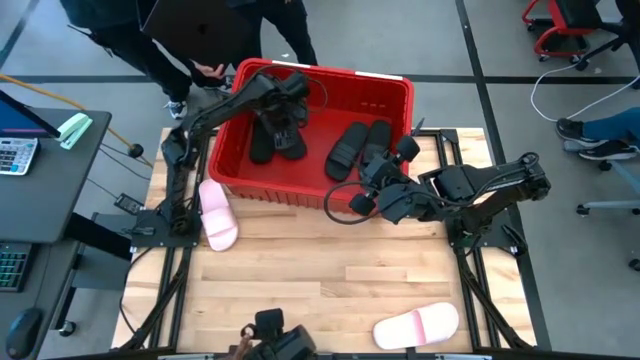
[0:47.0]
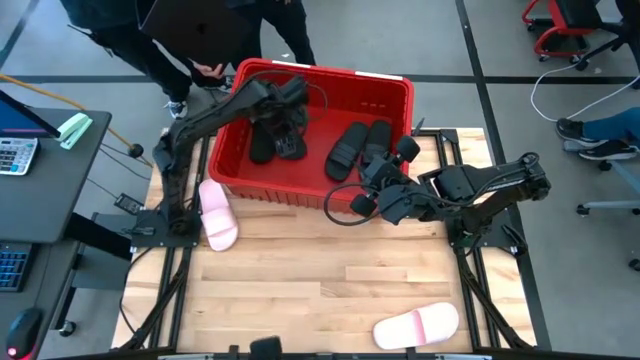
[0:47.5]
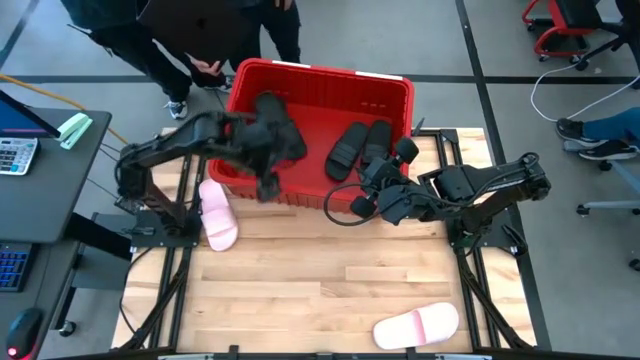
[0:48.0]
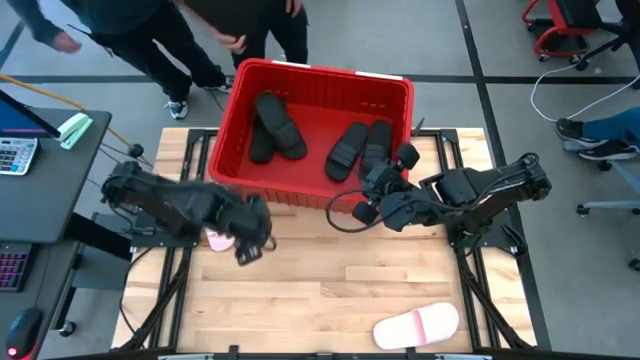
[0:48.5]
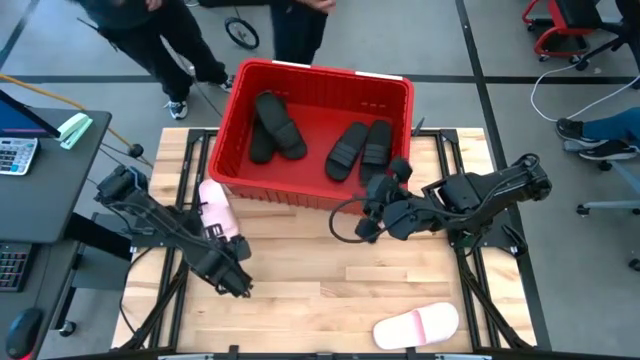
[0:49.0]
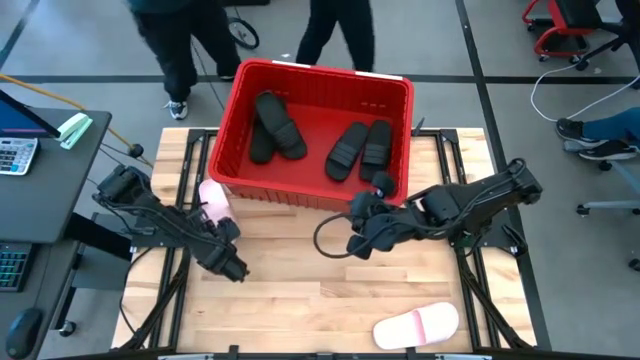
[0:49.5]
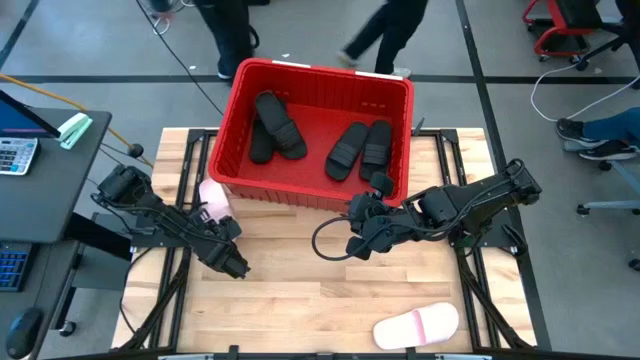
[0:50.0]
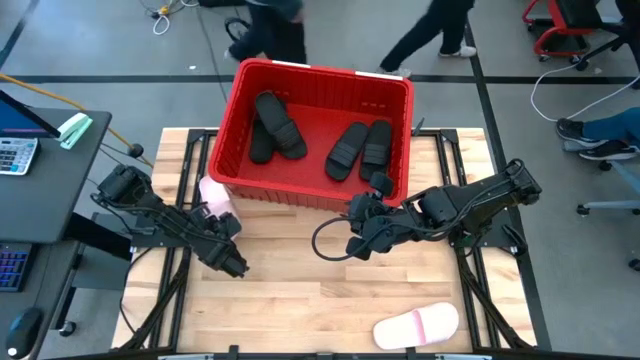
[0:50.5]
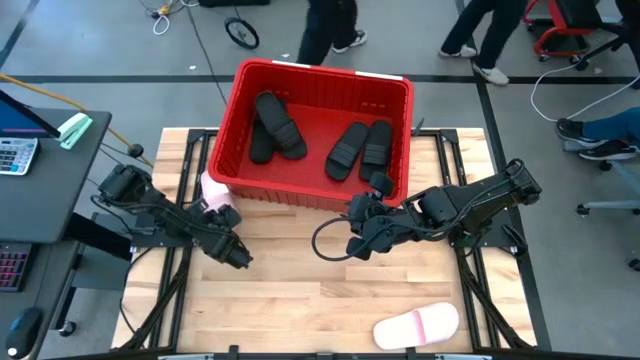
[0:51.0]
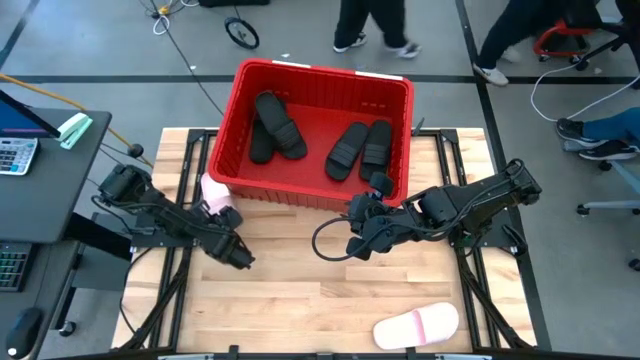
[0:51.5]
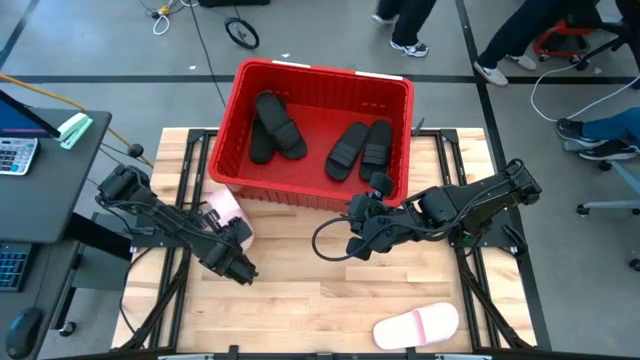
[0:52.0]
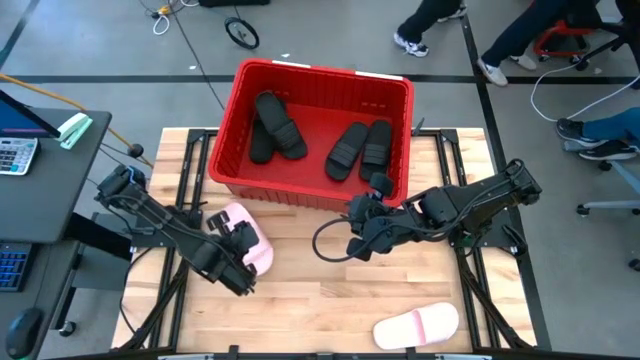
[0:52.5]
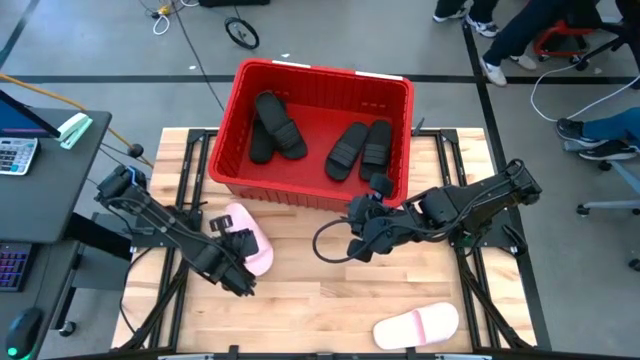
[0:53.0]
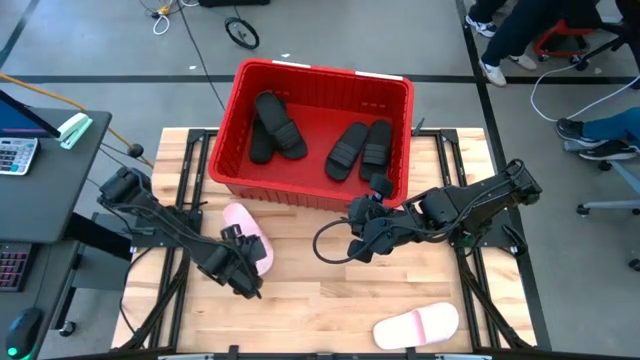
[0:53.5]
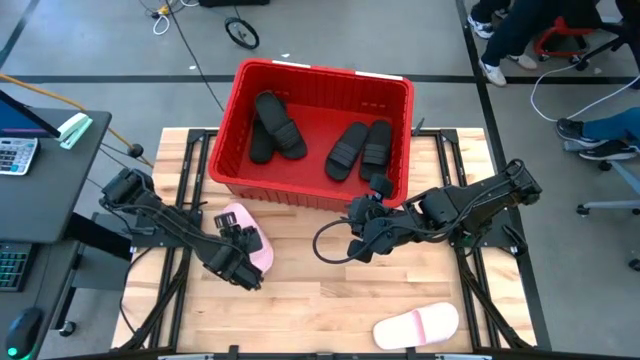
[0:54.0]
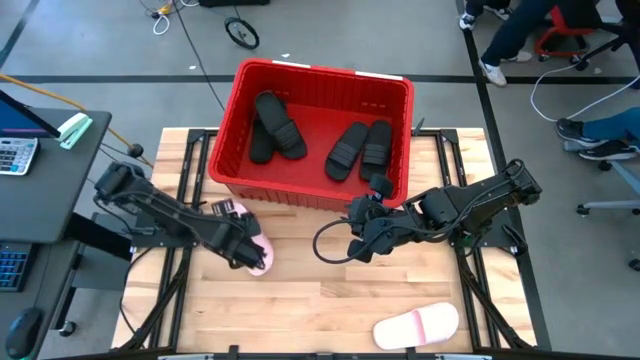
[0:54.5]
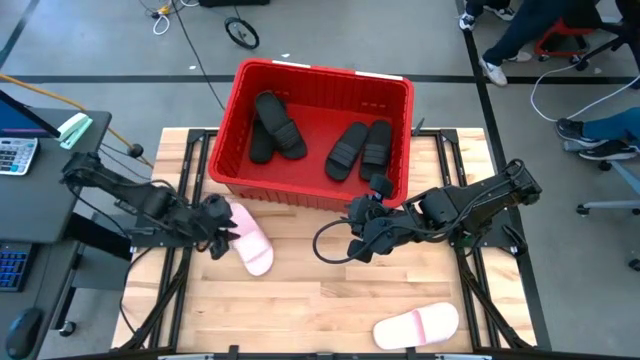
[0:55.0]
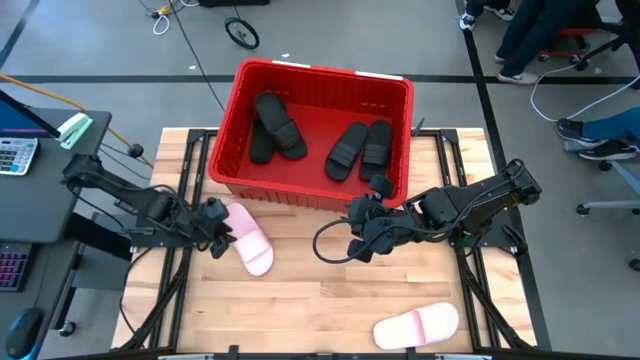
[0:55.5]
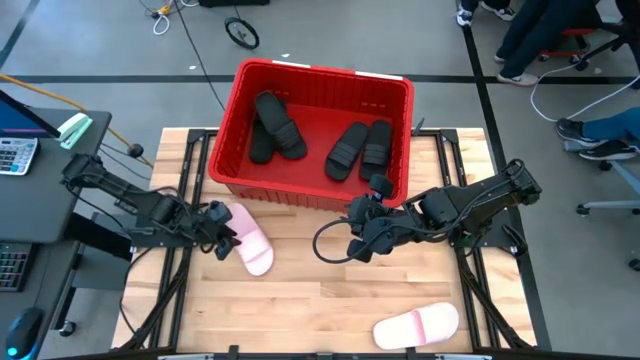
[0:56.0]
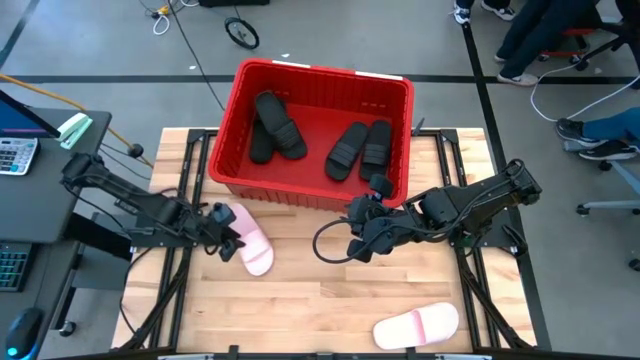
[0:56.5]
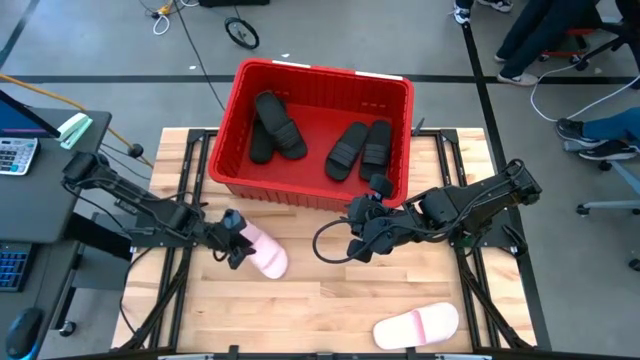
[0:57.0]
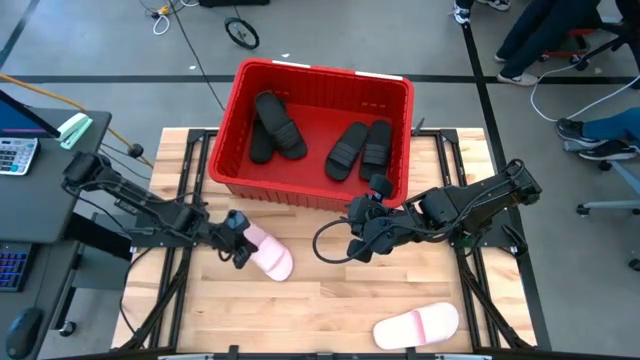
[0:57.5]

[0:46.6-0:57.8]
Task: Pick and place slides into bin
Put the top pink slide into the bin

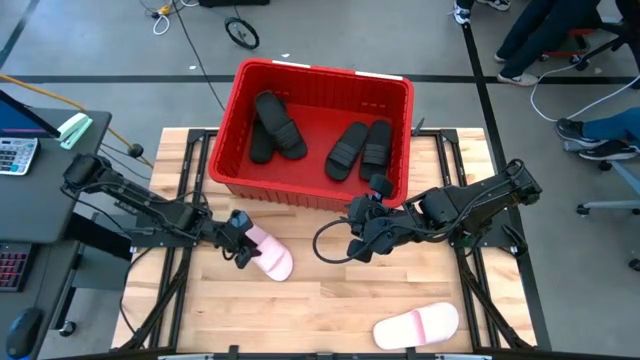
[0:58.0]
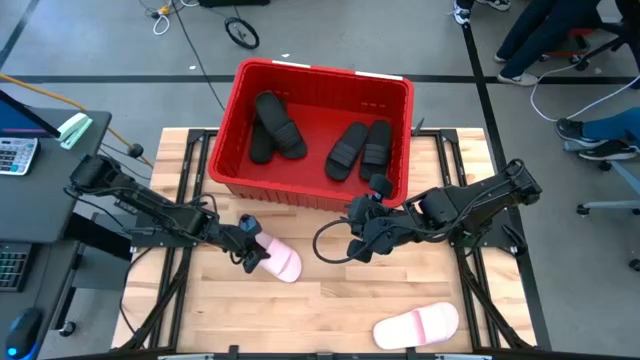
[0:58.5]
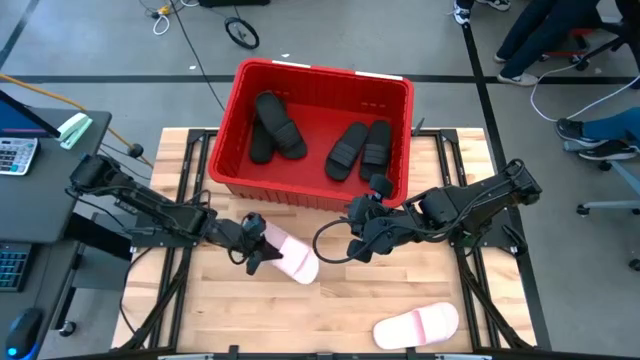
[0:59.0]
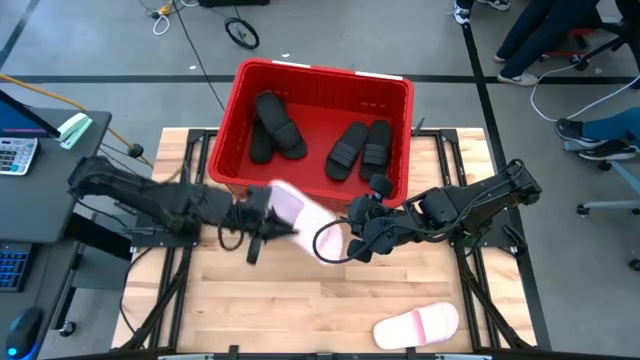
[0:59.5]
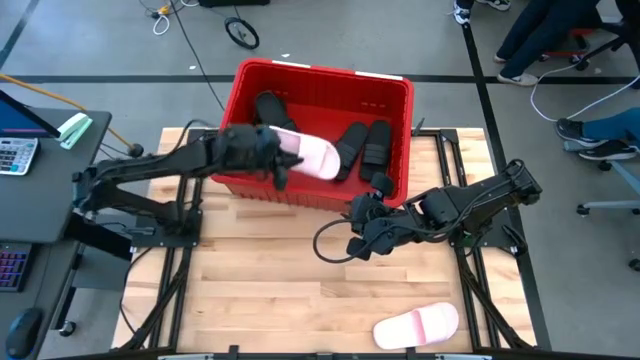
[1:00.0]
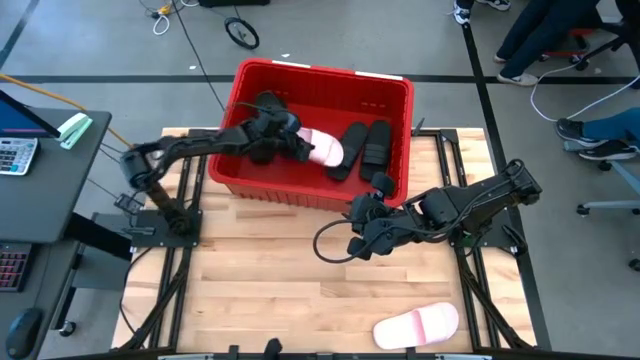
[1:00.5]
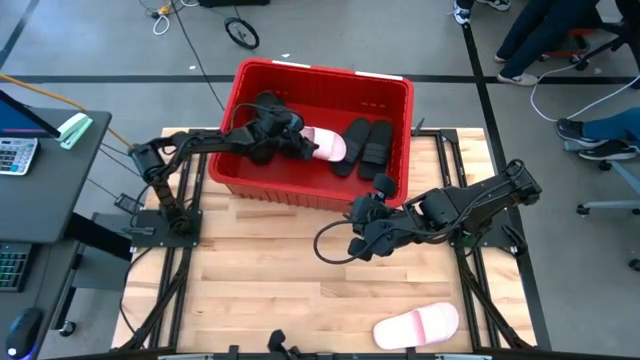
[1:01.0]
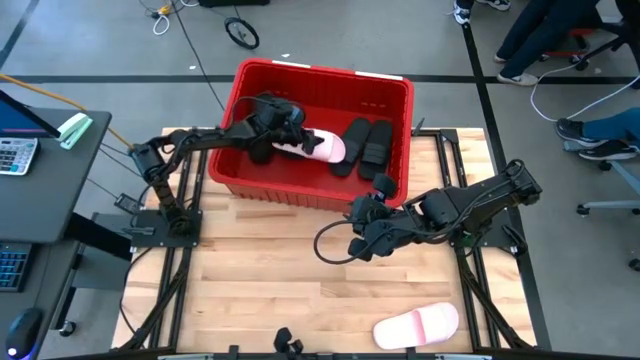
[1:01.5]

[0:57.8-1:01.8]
Put the top pink slide into the bin

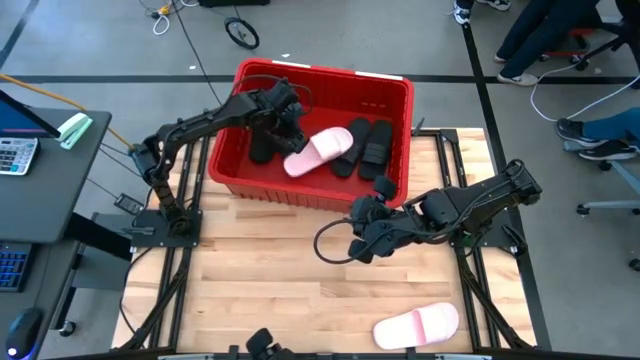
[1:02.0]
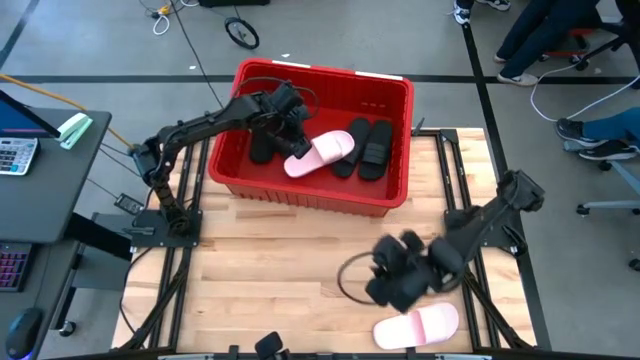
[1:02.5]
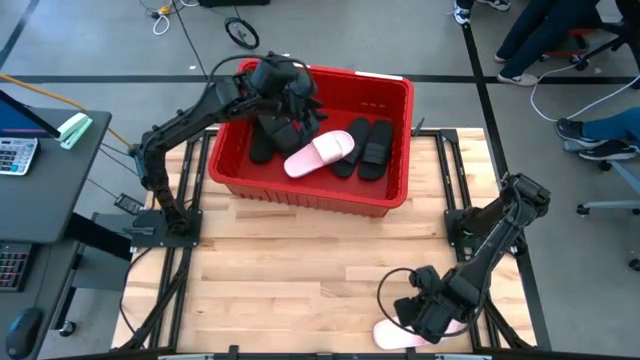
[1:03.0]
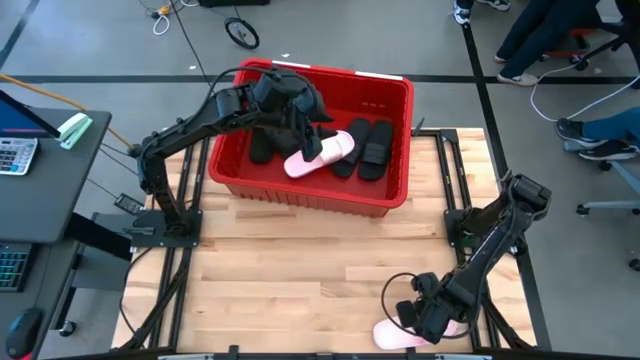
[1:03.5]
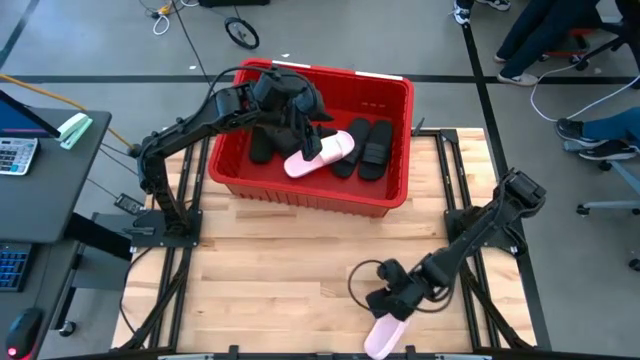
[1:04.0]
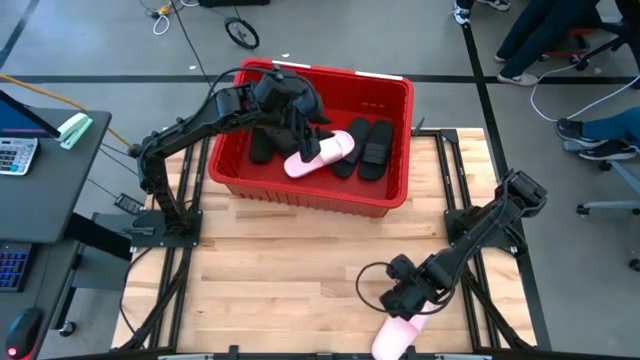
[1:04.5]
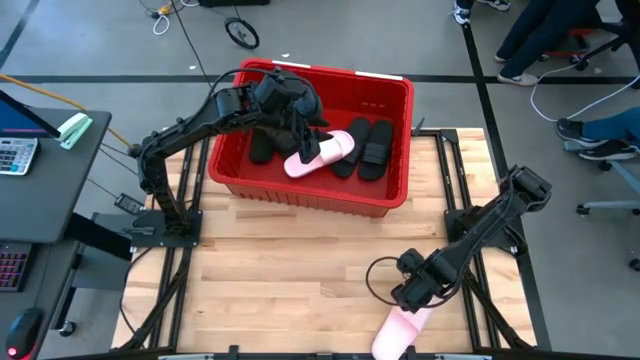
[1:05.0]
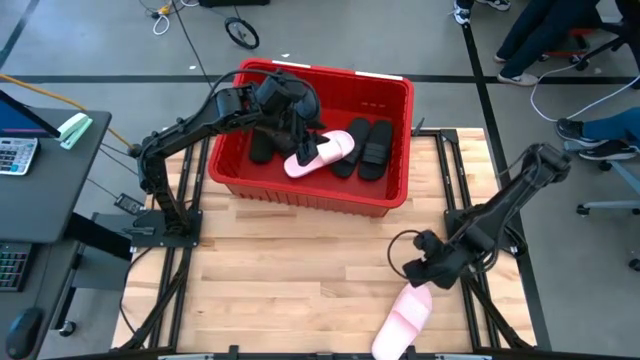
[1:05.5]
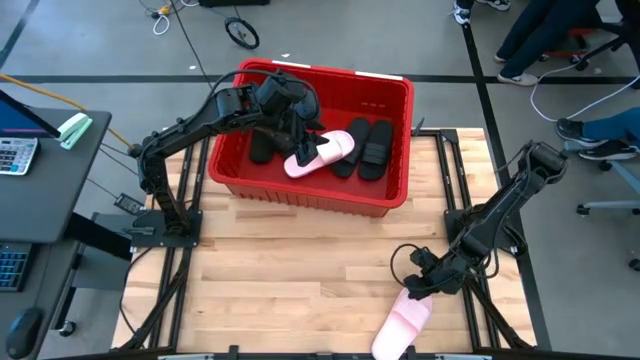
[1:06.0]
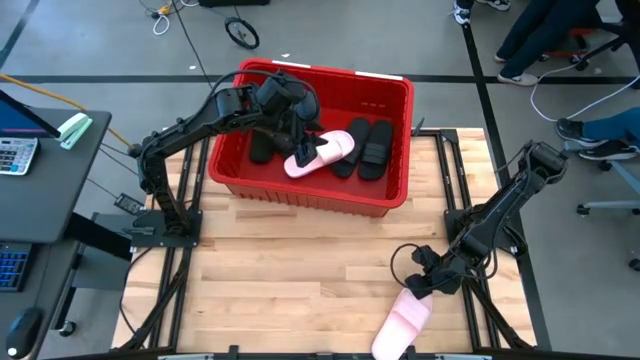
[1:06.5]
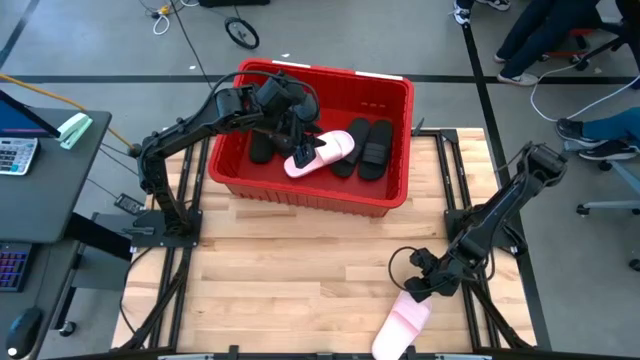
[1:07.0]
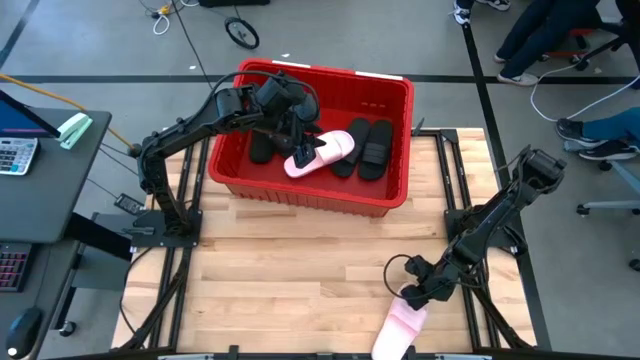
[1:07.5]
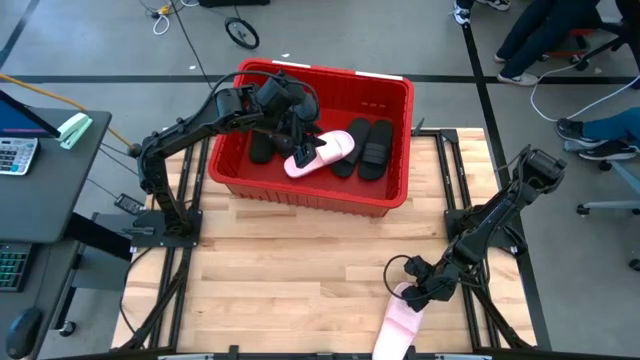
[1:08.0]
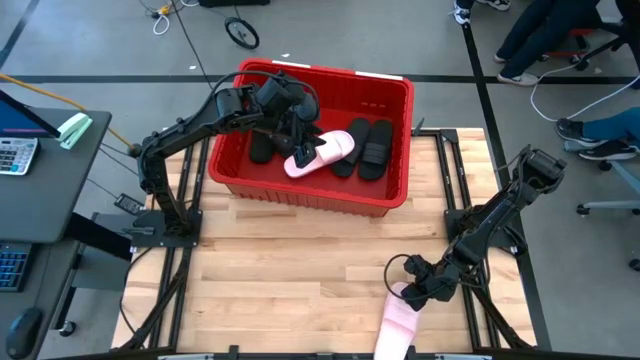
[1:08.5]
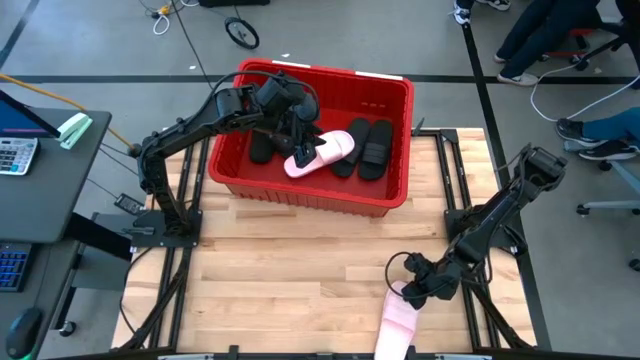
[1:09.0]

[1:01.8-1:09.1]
Put the pink slide into the bin
